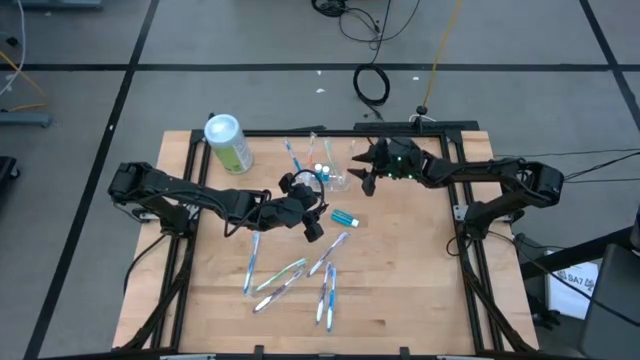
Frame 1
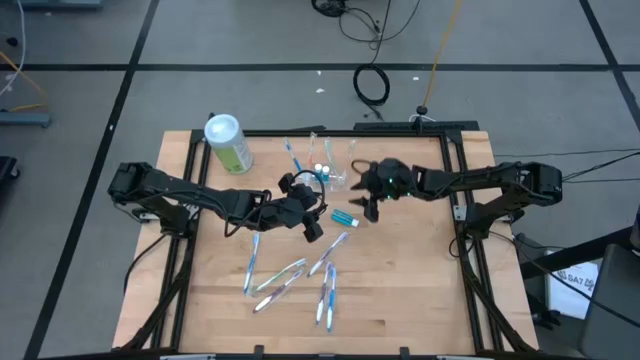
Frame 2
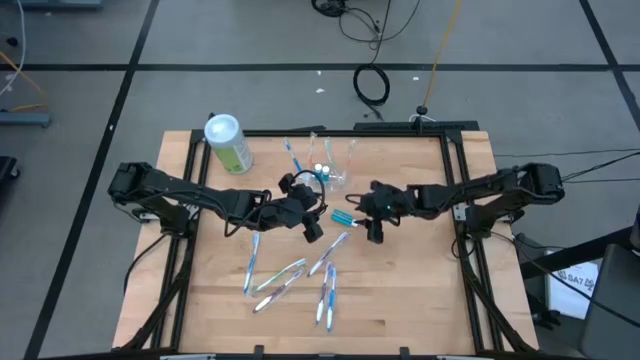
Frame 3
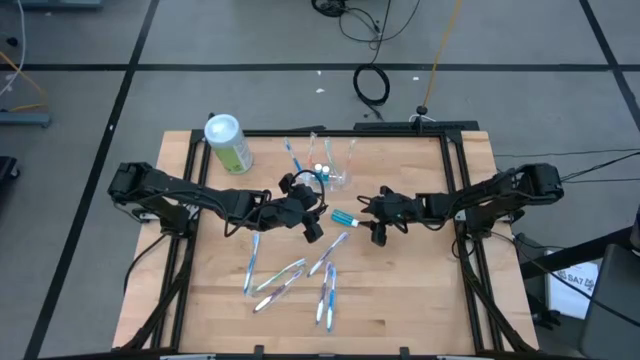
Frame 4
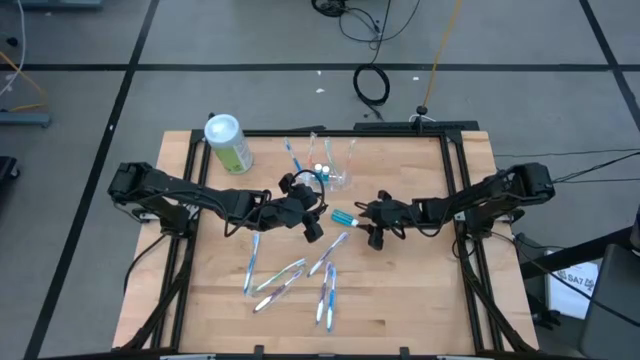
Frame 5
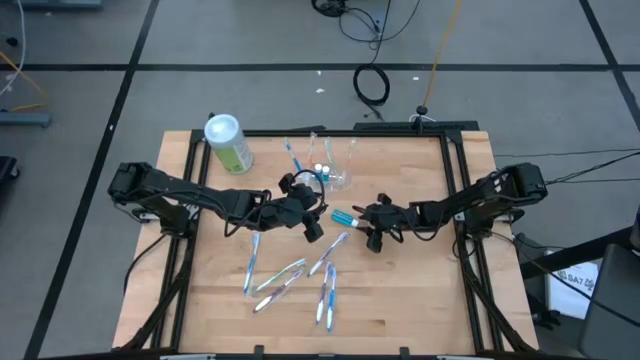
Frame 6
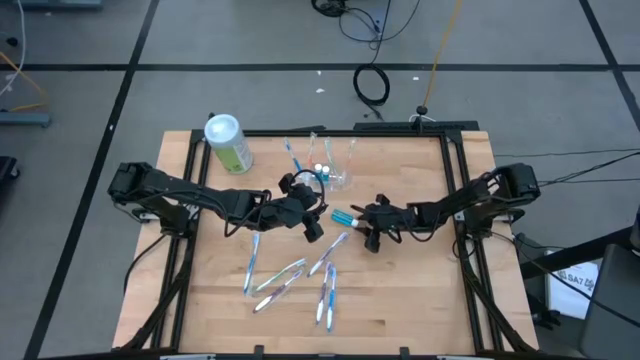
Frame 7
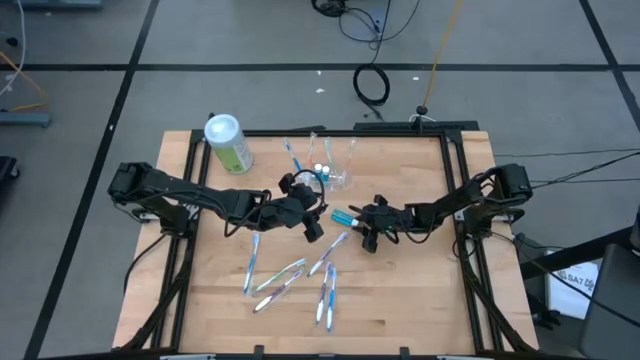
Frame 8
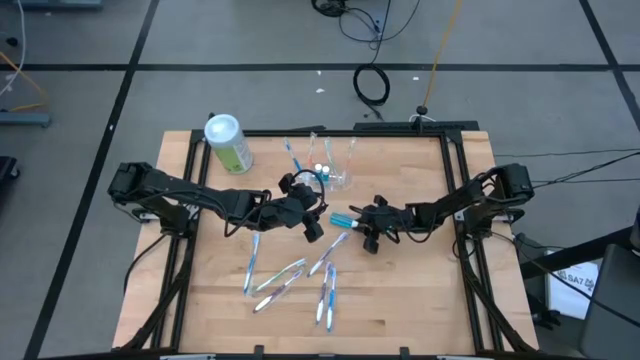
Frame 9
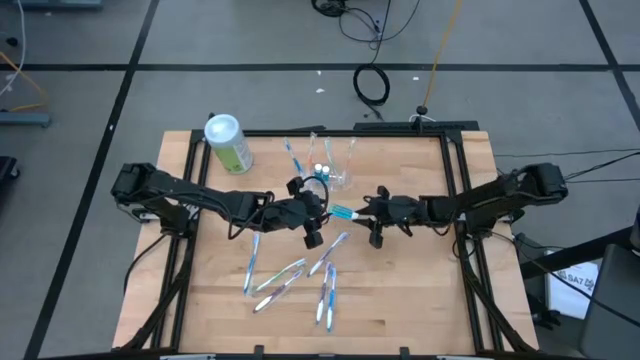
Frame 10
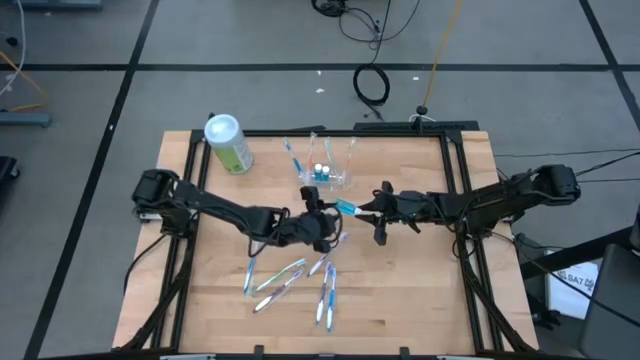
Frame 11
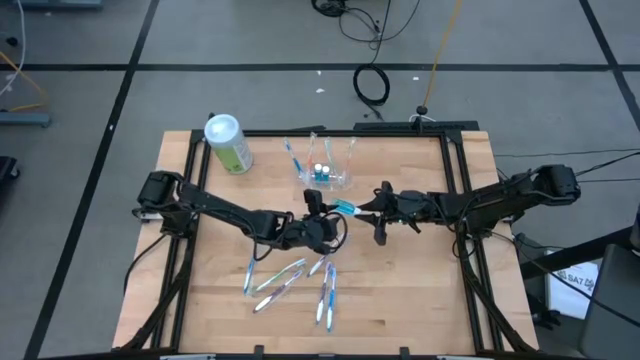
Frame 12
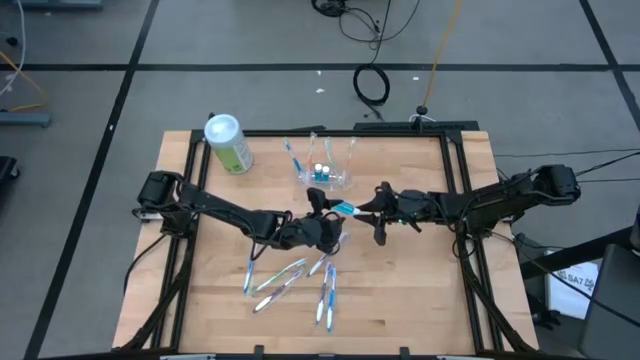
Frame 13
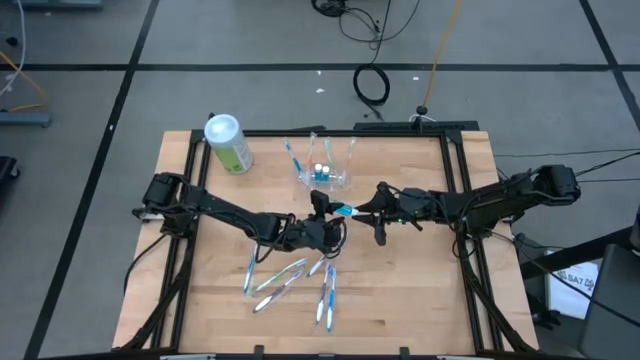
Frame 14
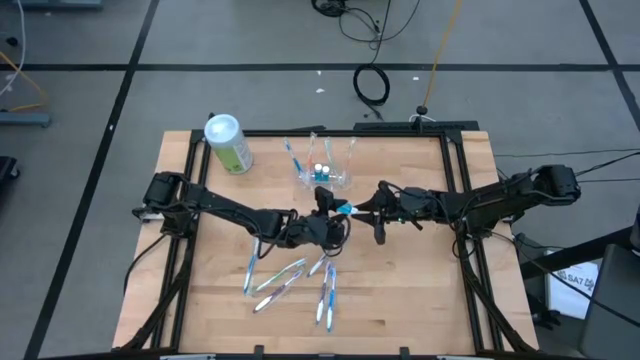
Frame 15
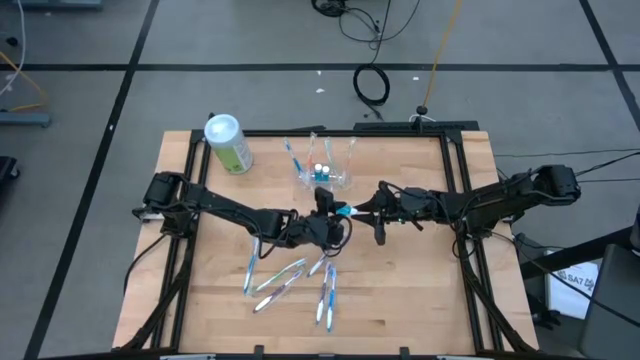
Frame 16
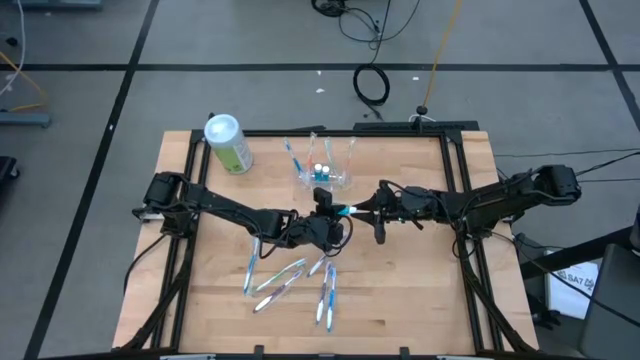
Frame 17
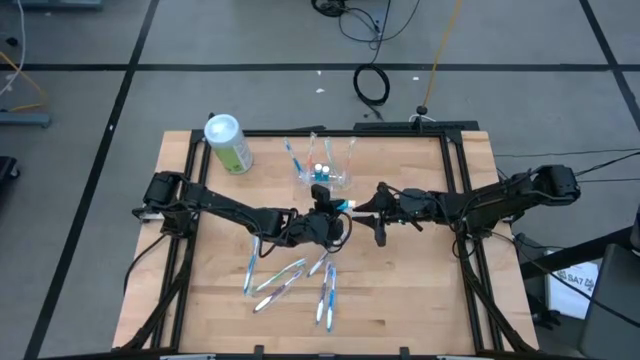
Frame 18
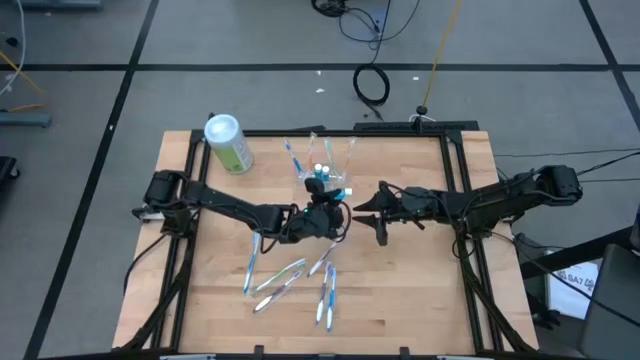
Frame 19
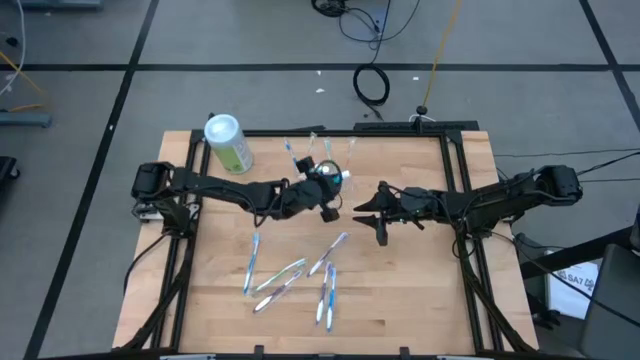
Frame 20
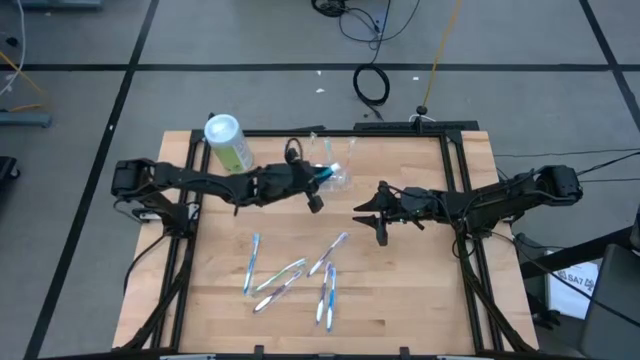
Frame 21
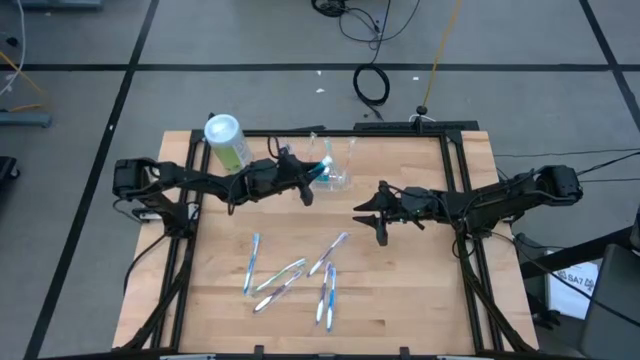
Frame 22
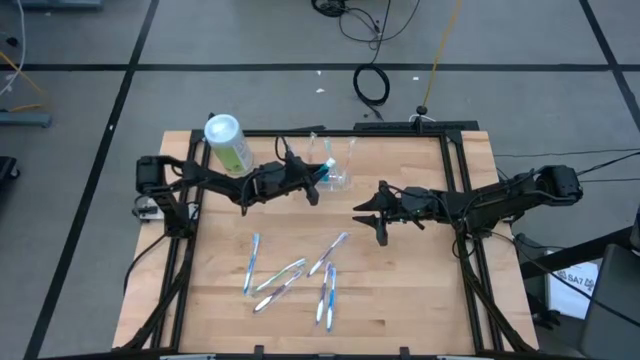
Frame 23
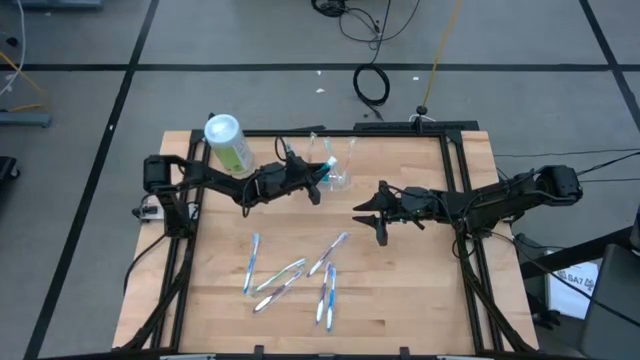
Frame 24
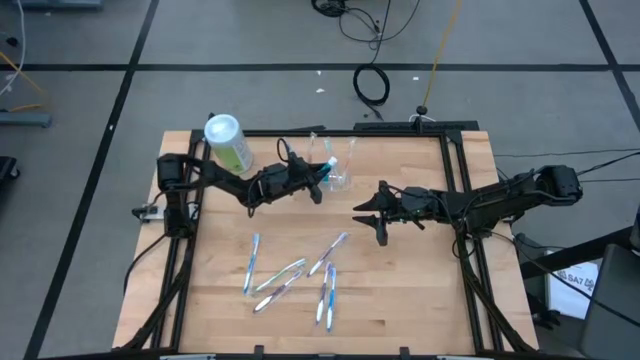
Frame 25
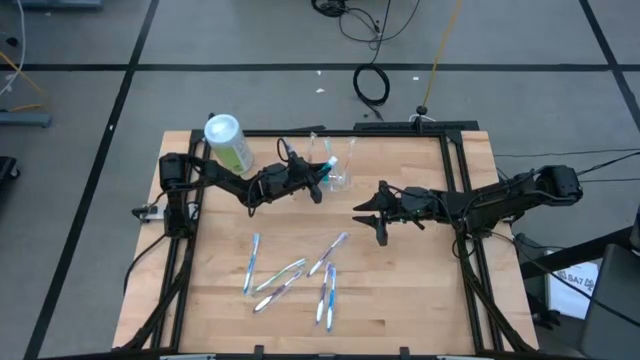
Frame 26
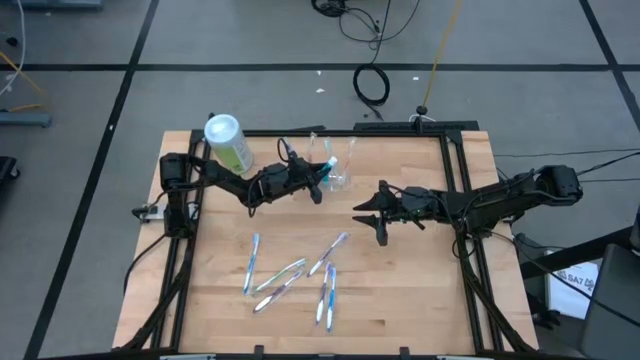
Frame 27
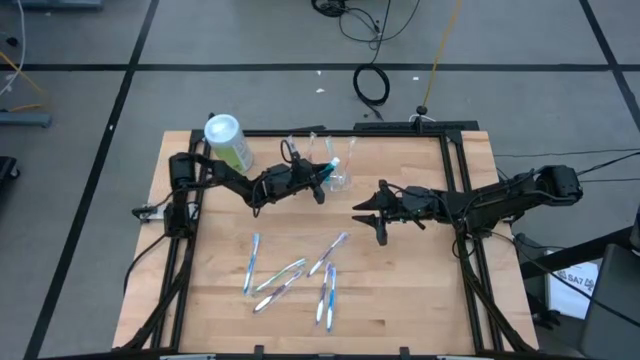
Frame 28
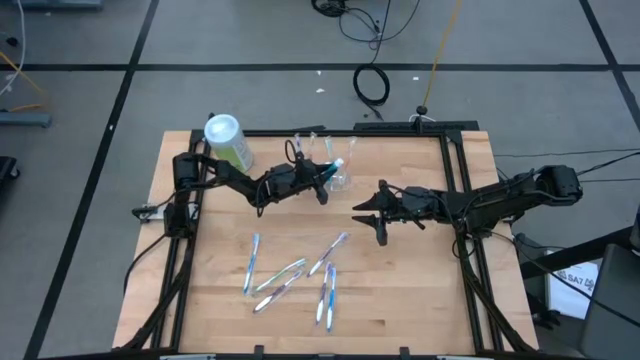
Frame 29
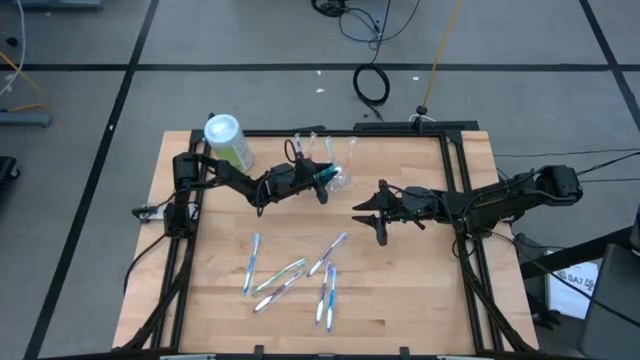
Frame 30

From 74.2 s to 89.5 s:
Task: Pick & Place toothbrushing station
Put the blue mouthwash into the transparent organizer

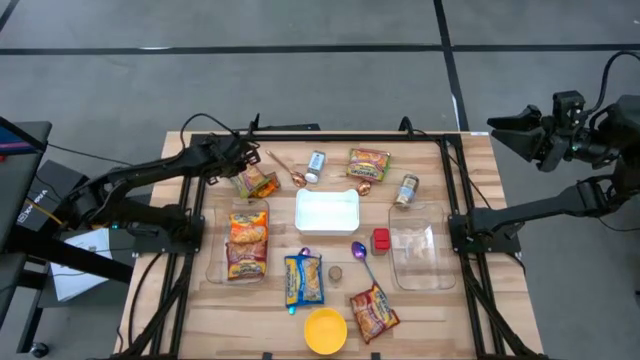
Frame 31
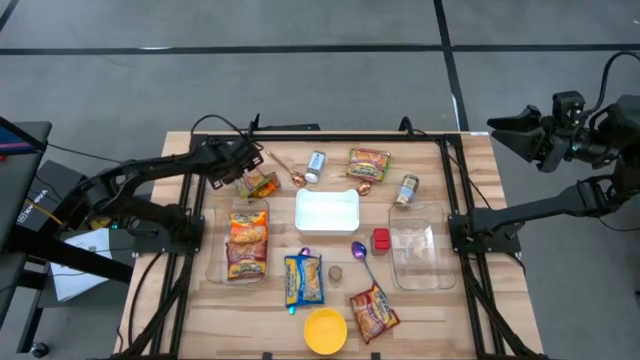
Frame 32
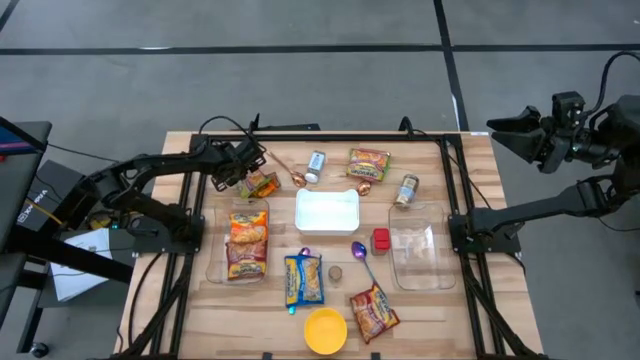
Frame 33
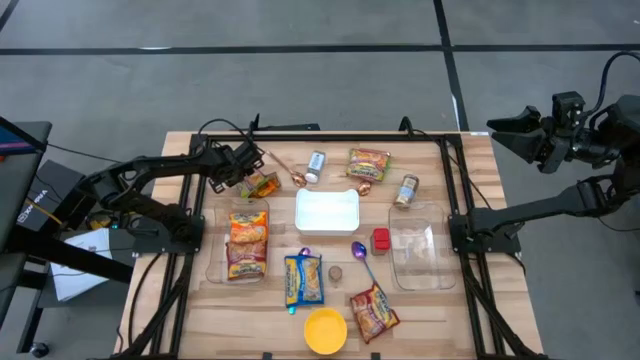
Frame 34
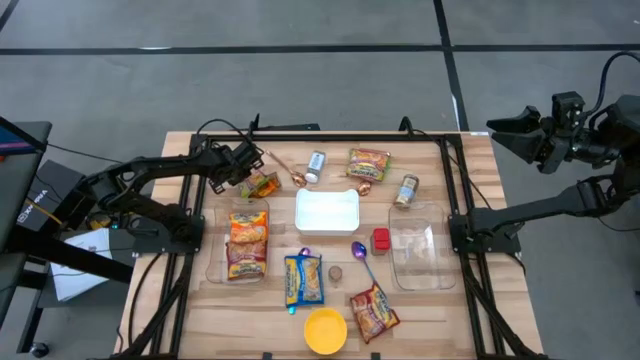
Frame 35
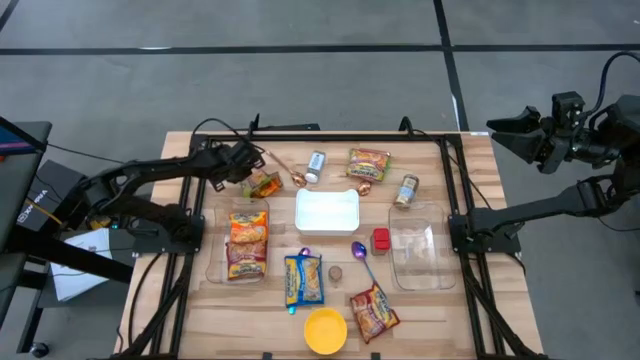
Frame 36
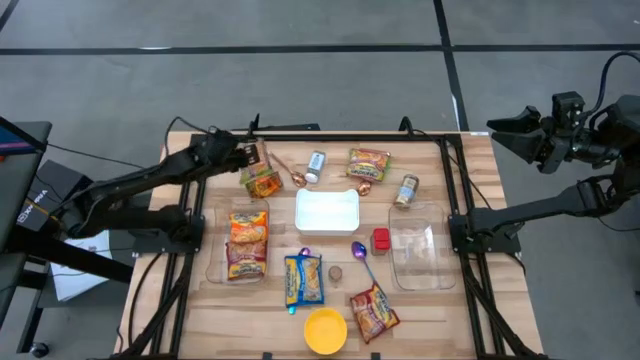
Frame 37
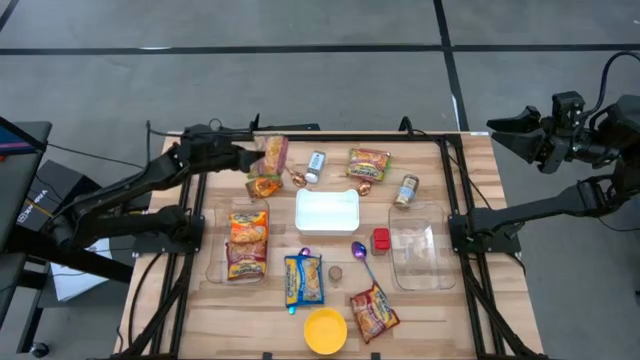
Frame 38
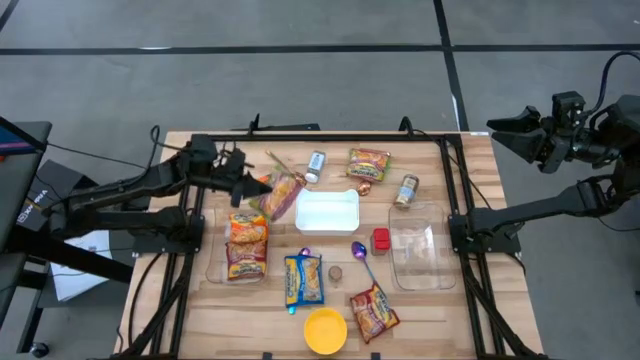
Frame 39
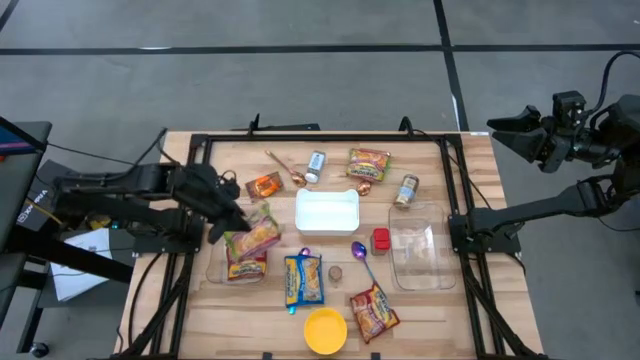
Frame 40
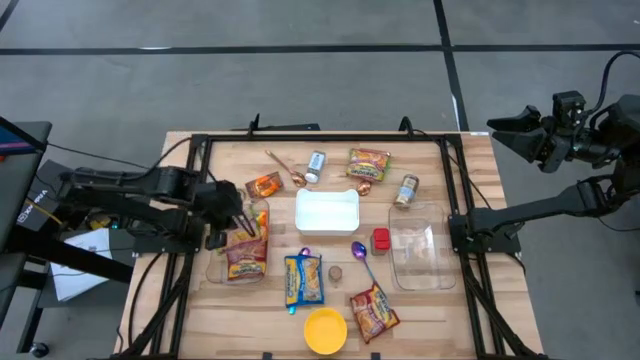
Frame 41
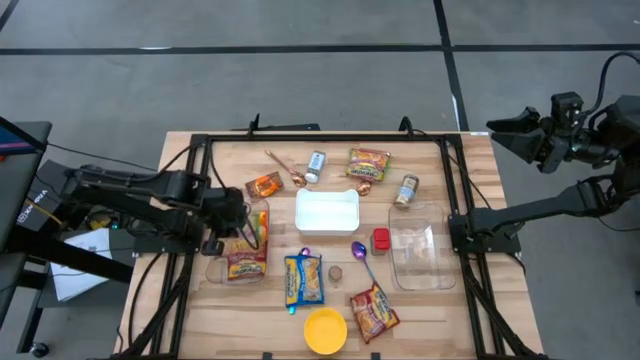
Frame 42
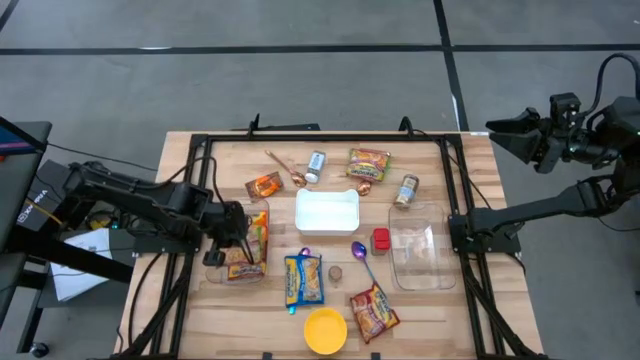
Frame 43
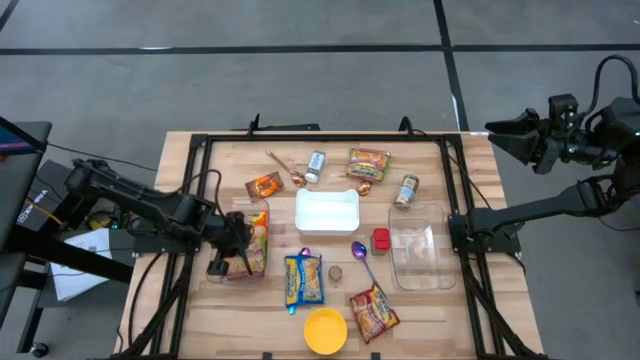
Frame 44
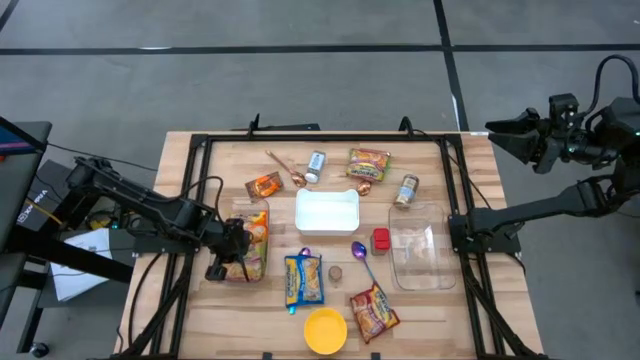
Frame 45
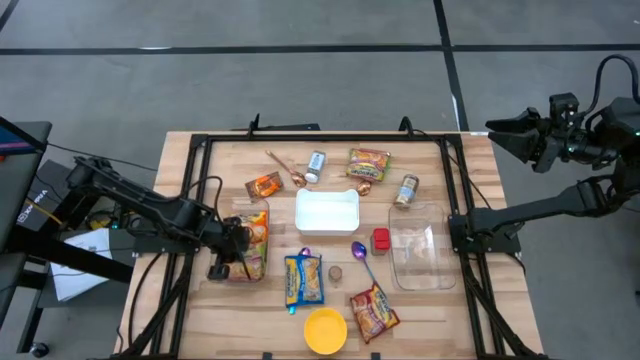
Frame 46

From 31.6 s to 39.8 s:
Task: Pick & Place Food Item
Put the left green noodle pack into the left transparent bin
